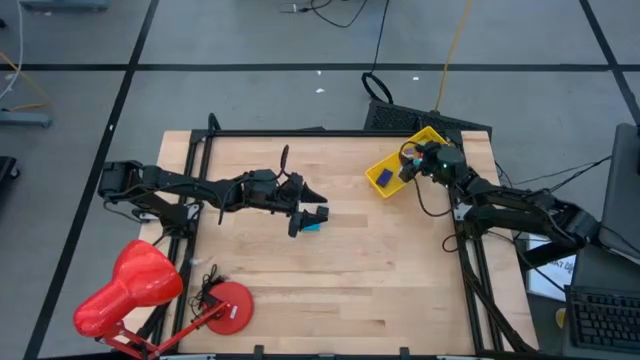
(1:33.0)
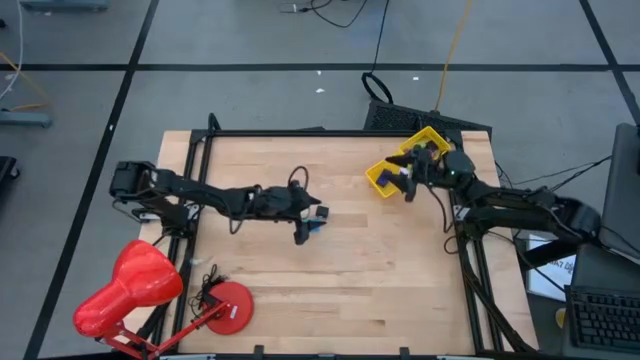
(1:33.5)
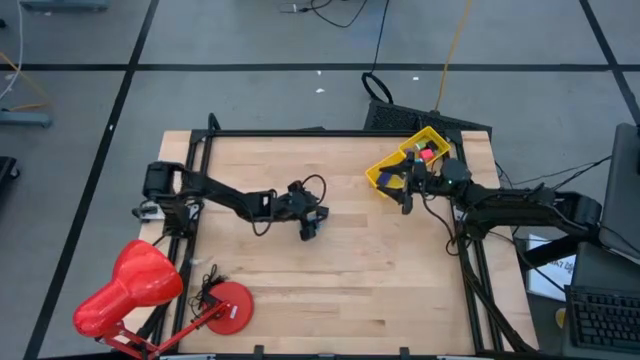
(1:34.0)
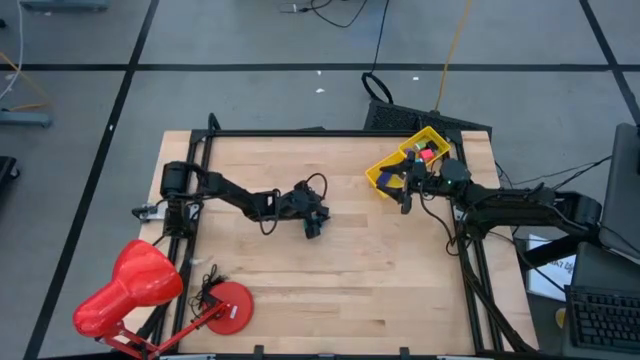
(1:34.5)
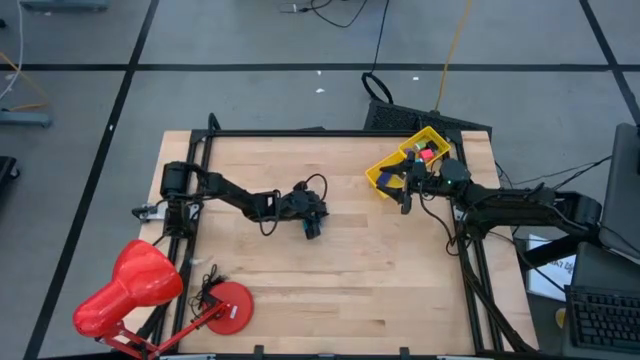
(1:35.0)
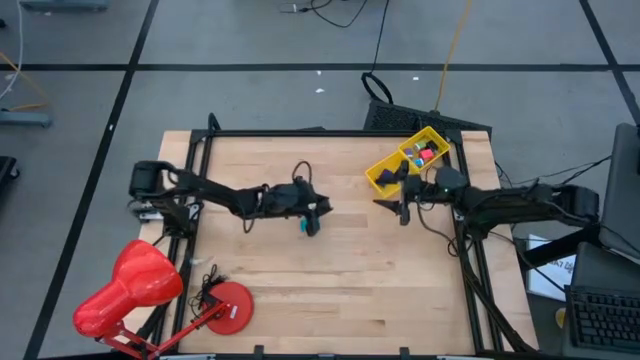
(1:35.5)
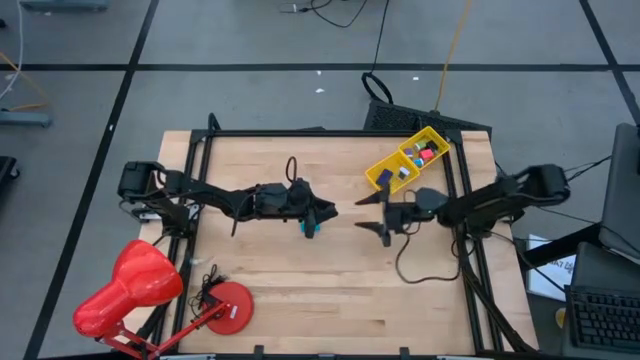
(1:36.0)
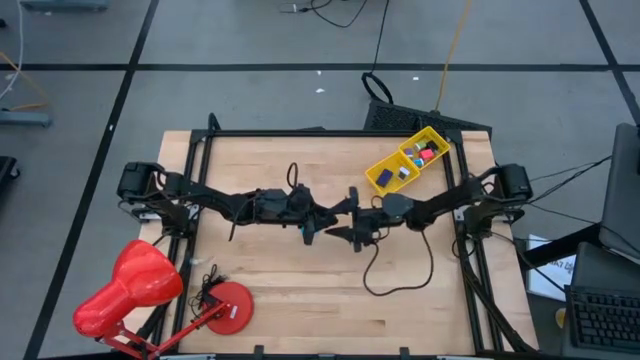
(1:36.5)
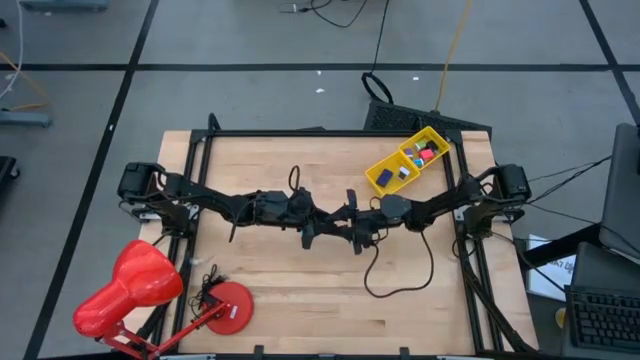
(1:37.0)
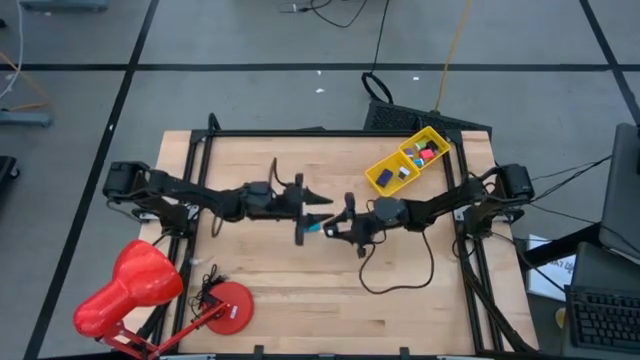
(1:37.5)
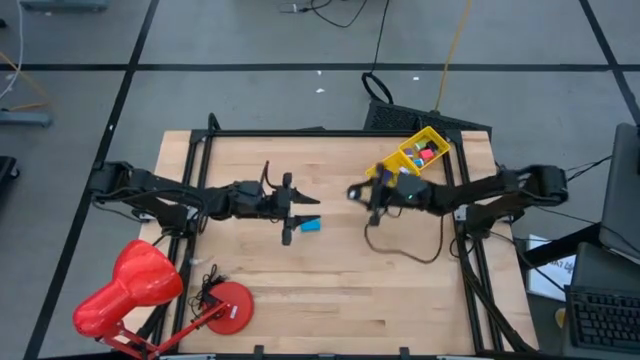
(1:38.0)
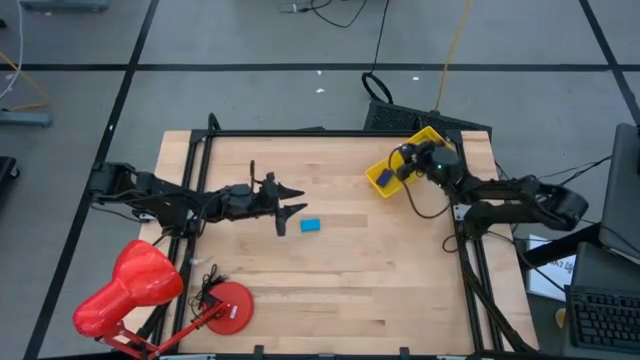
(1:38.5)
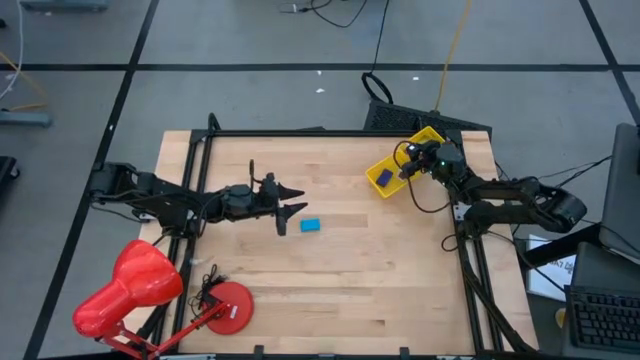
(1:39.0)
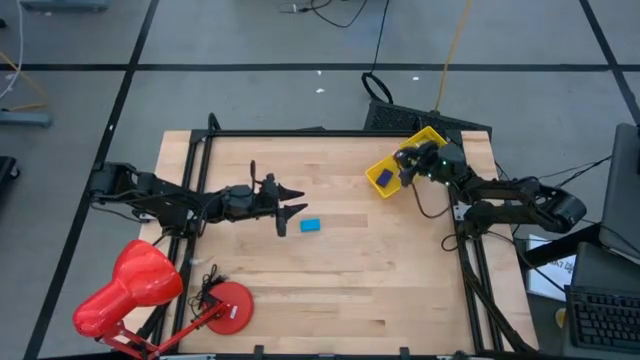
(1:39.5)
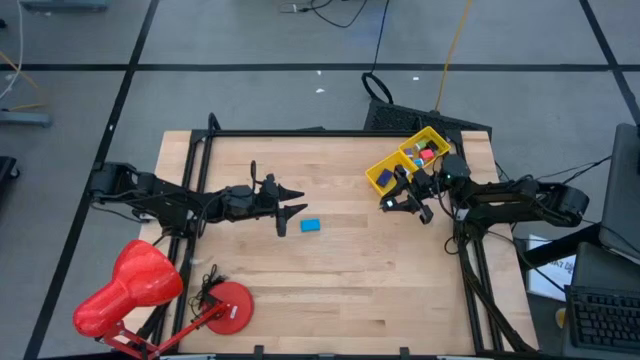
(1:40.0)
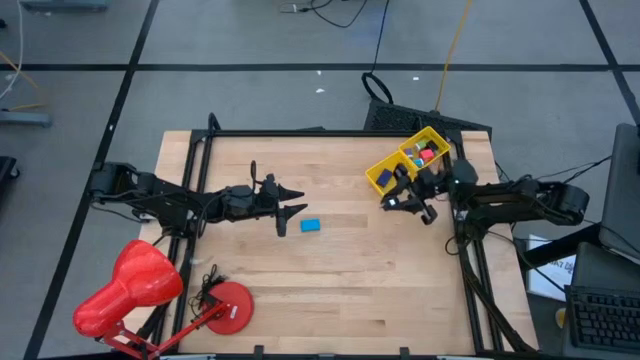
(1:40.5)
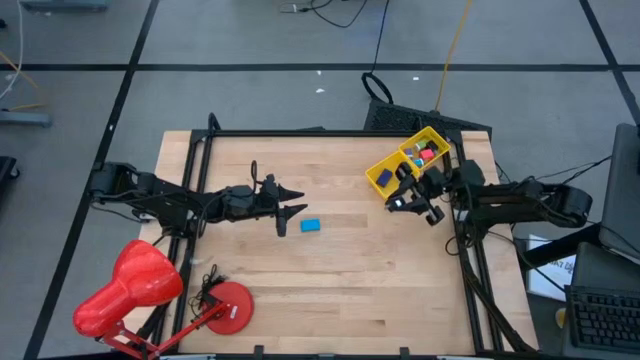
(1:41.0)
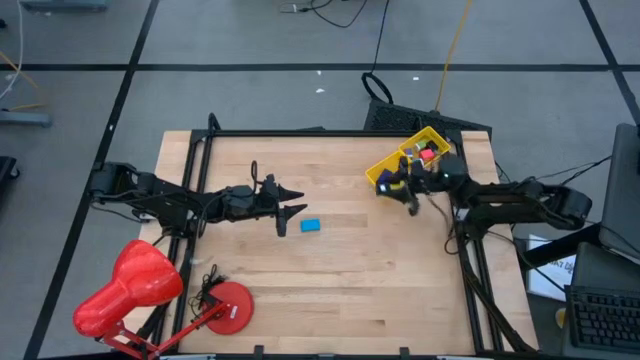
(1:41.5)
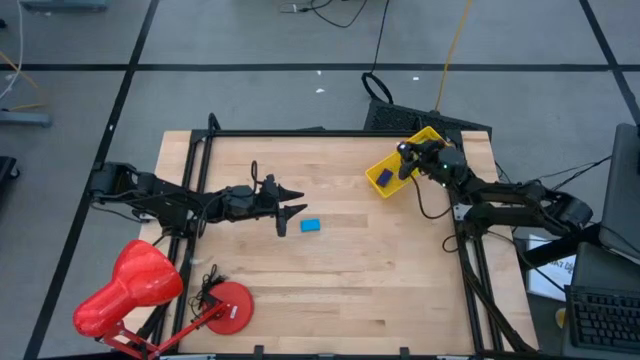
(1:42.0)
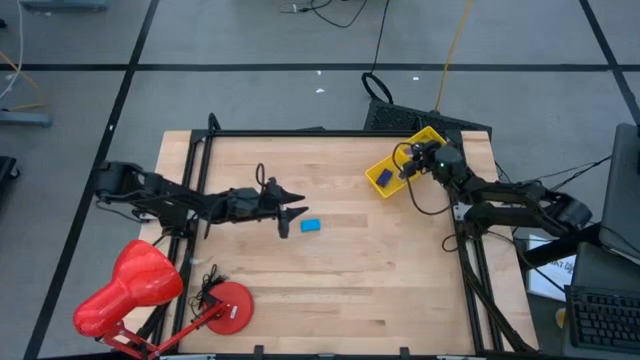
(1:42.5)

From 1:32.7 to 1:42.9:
Task: Pick & Place Office items
Put the black charger adapter into the top yellow basket

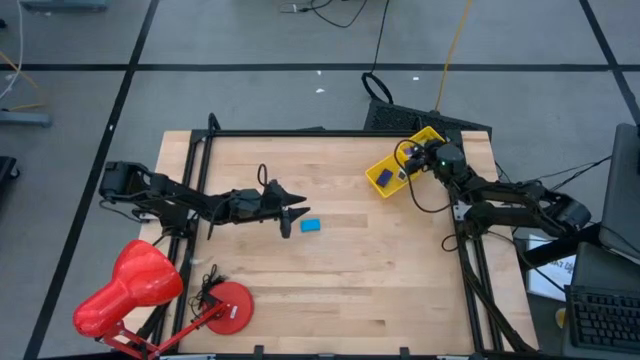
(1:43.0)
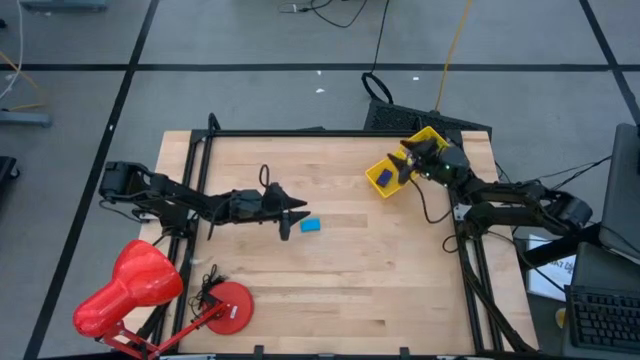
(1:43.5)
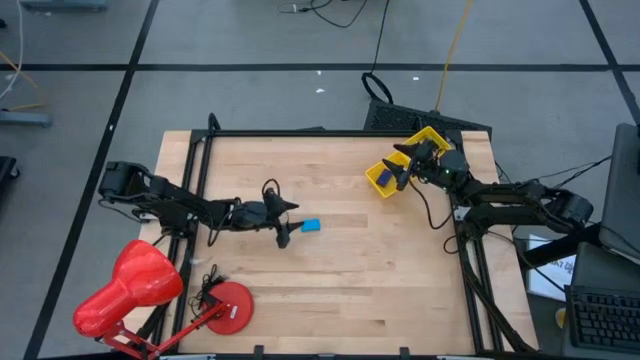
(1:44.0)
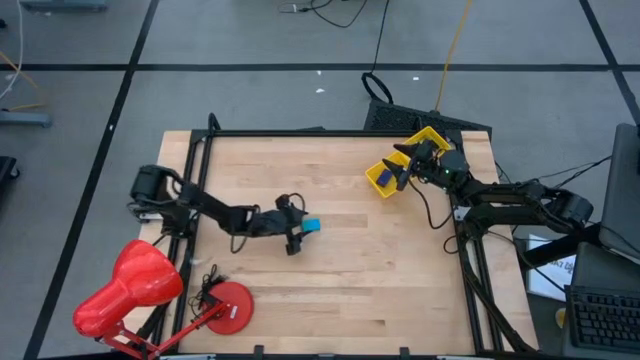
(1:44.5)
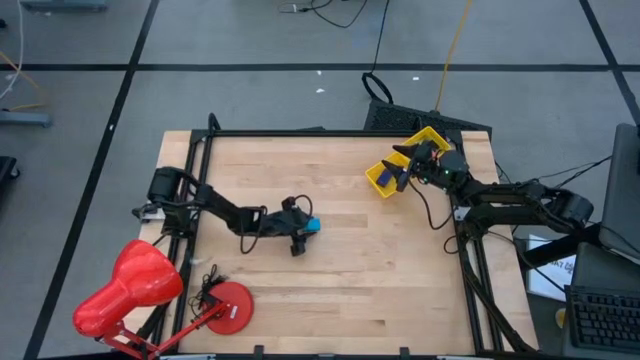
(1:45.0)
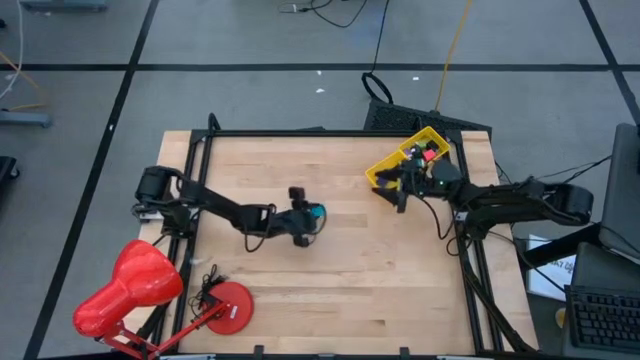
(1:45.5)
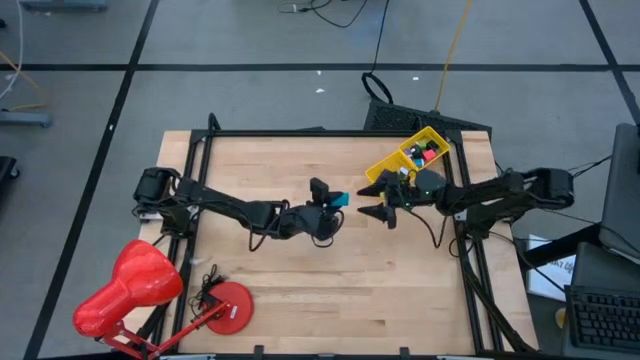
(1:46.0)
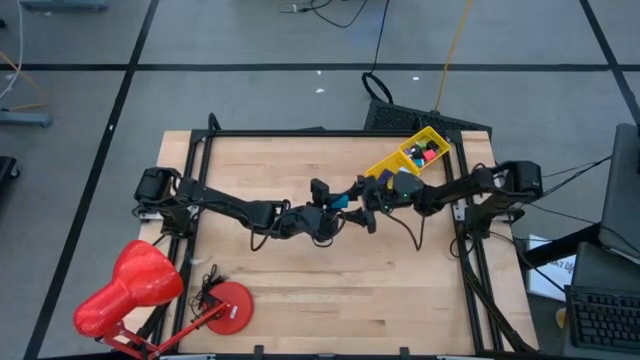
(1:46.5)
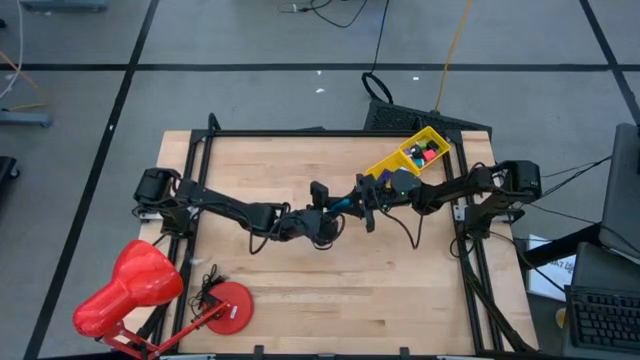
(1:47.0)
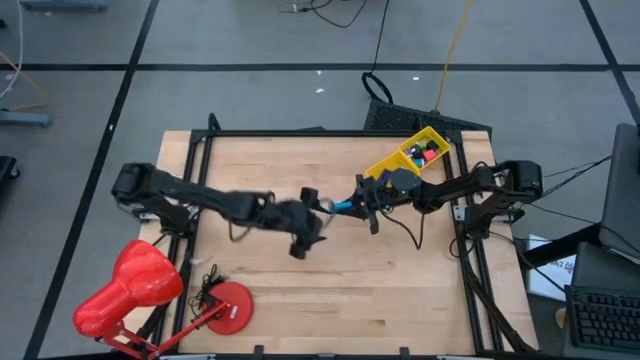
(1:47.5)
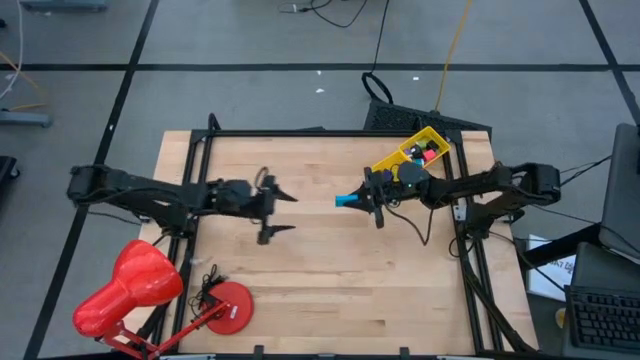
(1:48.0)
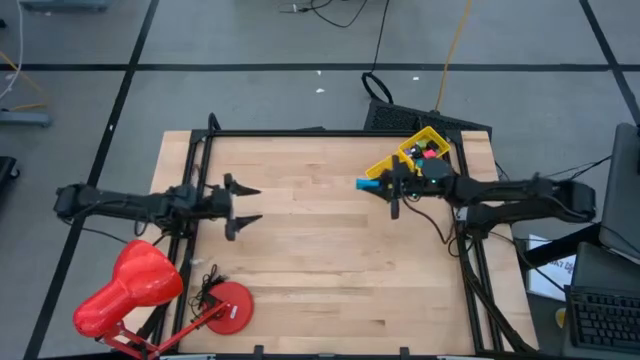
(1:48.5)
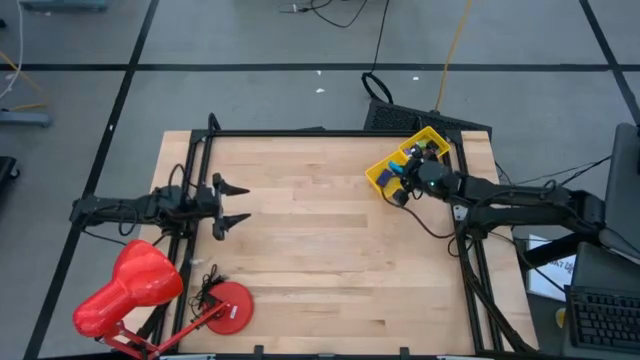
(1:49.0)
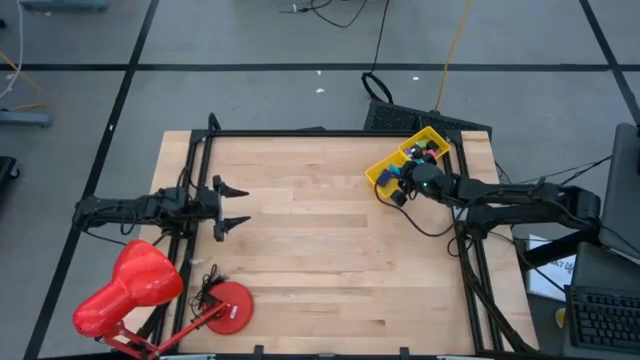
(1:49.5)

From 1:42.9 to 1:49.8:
Put the light blue digital clock into the bottom yellow basket

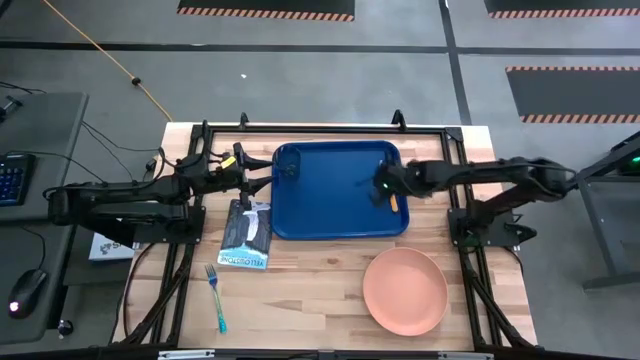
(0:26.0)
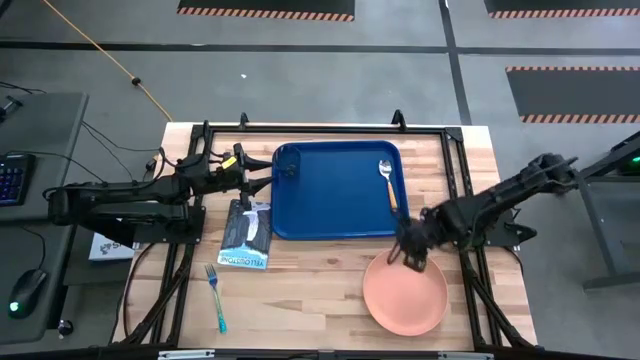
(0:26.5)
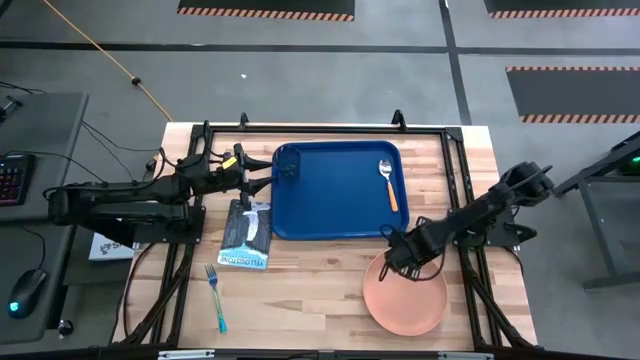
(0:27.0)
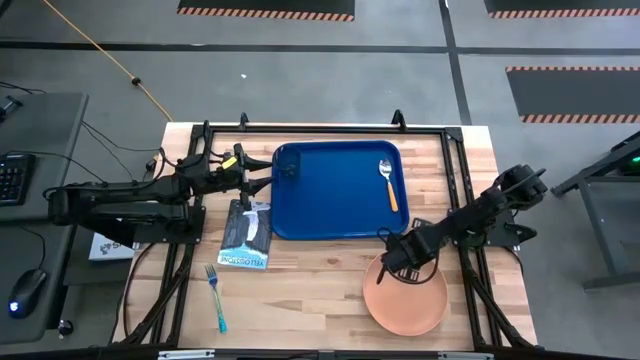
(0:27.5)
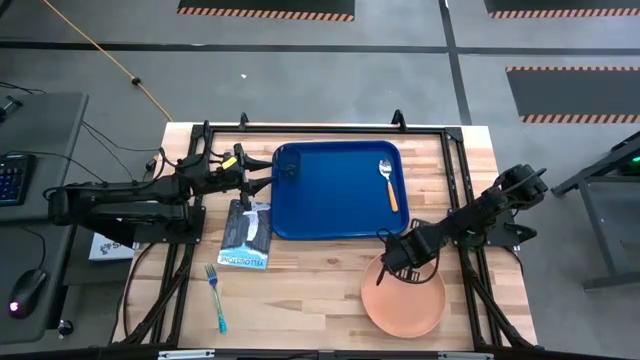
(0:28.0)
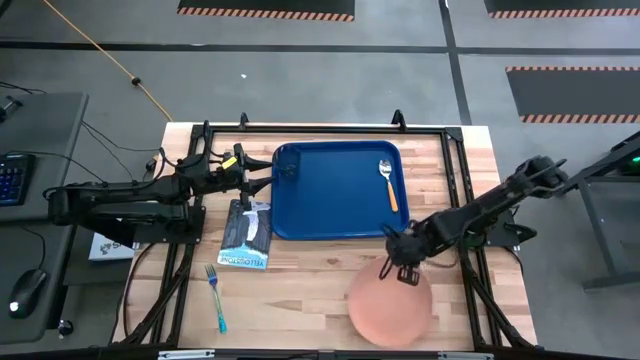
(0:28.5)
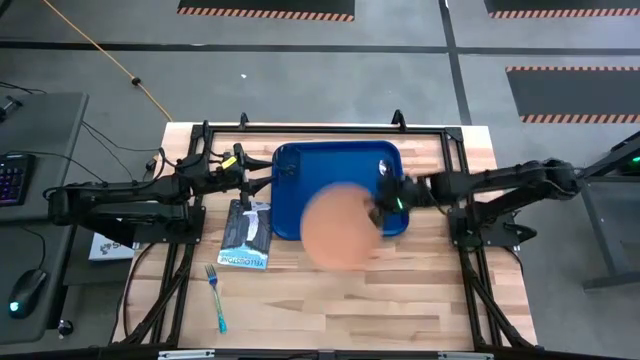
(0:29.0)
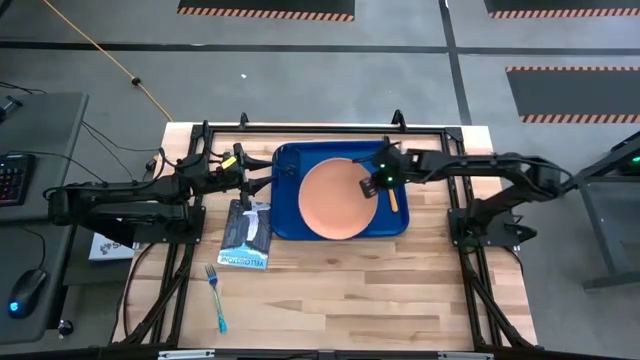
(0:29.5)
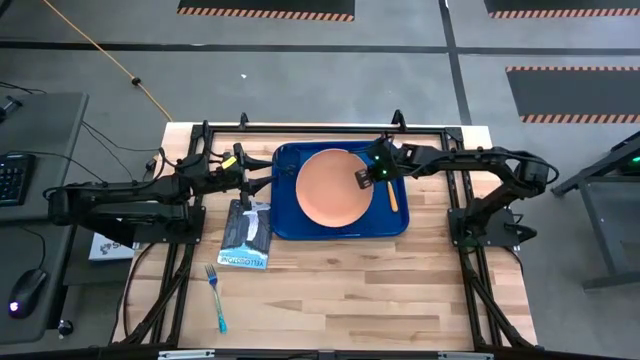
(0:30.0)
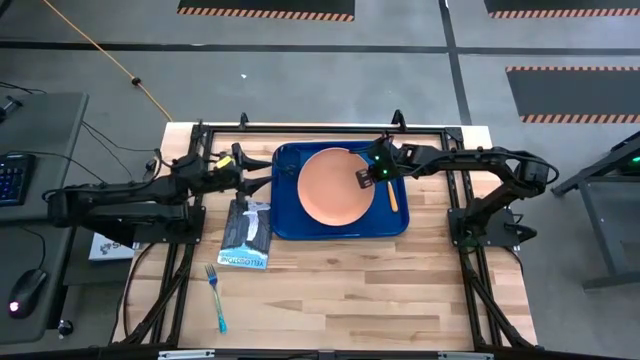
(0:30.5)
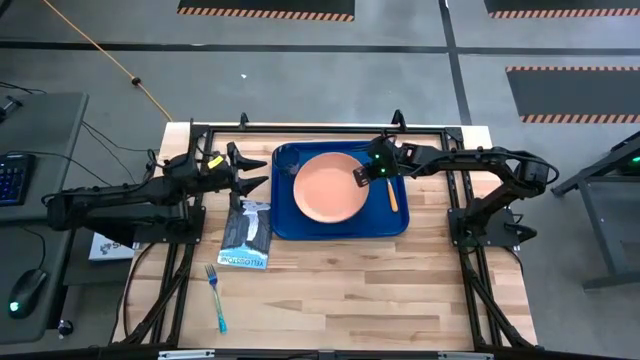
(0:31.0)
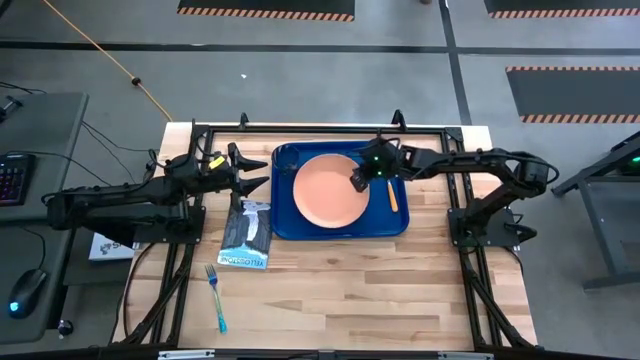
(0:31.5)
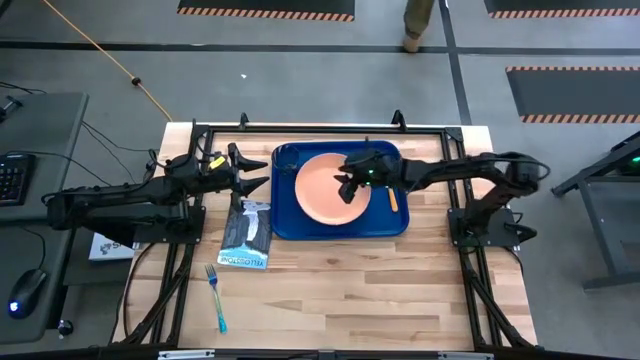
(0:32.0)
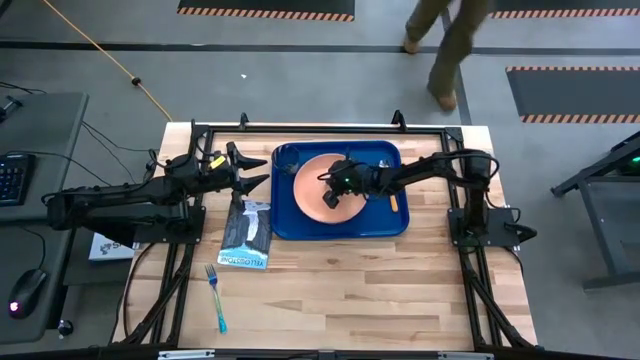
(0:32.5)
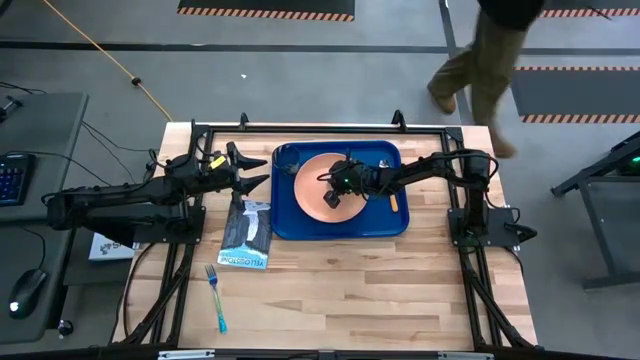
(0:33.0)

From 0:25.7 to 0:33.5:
Task: Pick and place plate/cup/fork/spoon on tray
Put the orange plate on the blue tray to the left side of the yellow spoon
